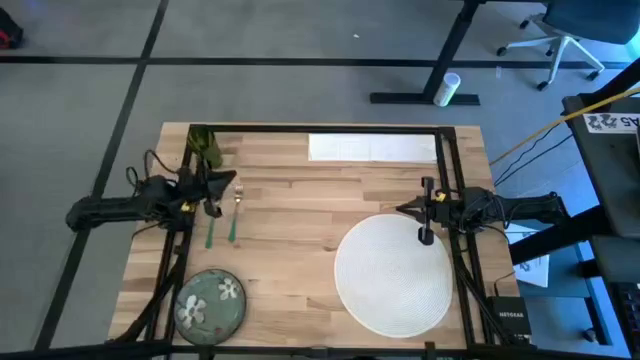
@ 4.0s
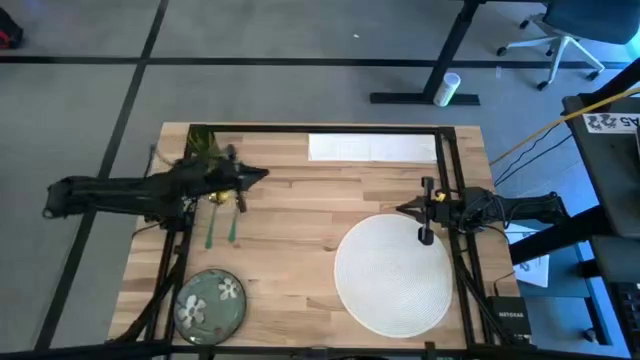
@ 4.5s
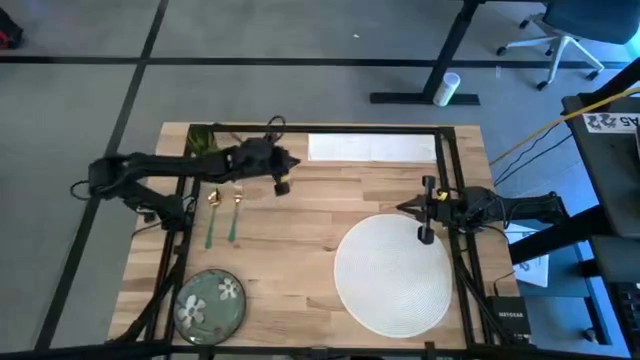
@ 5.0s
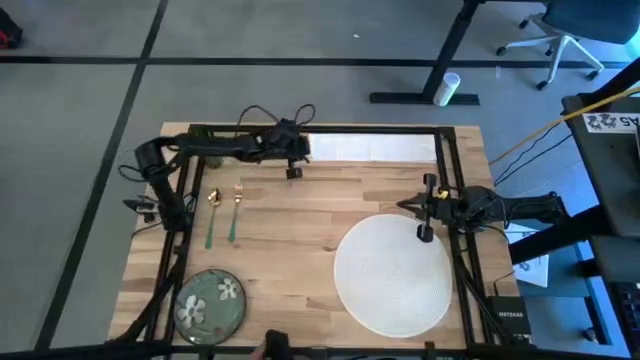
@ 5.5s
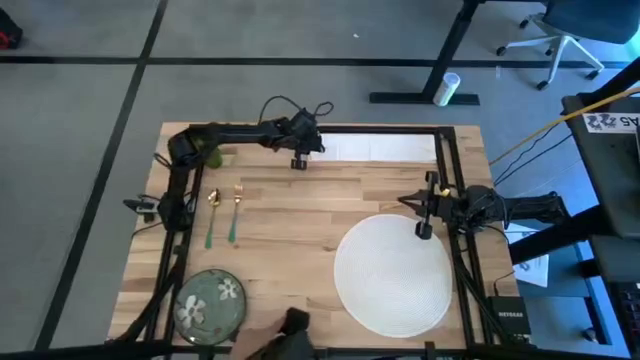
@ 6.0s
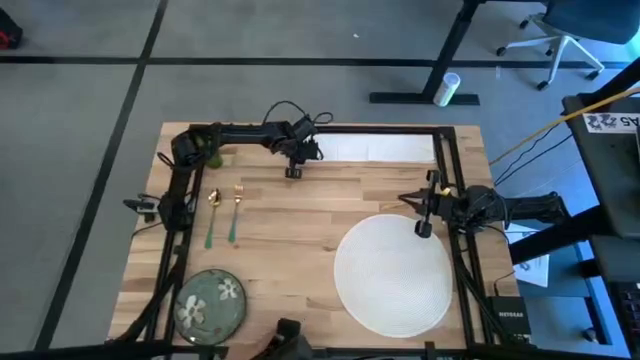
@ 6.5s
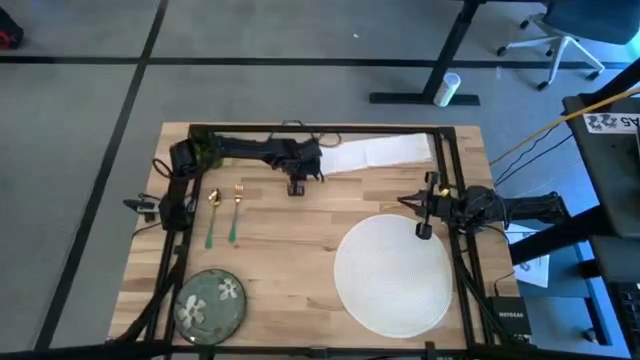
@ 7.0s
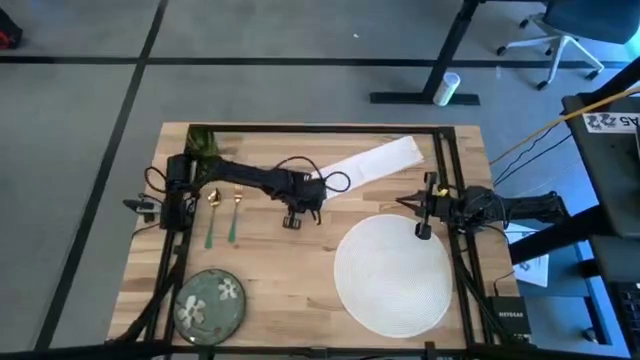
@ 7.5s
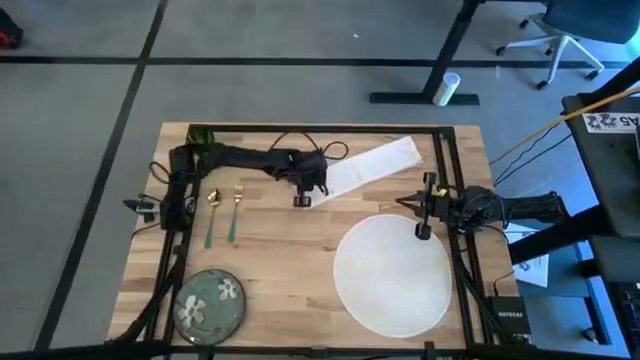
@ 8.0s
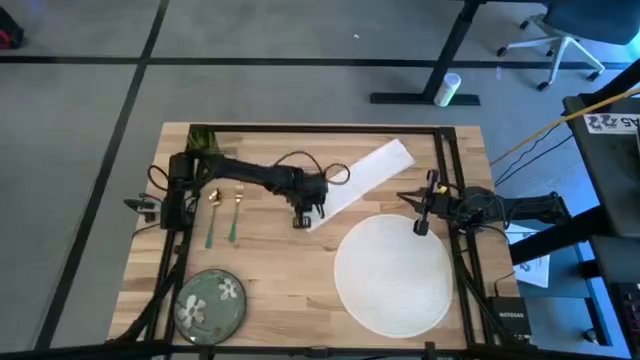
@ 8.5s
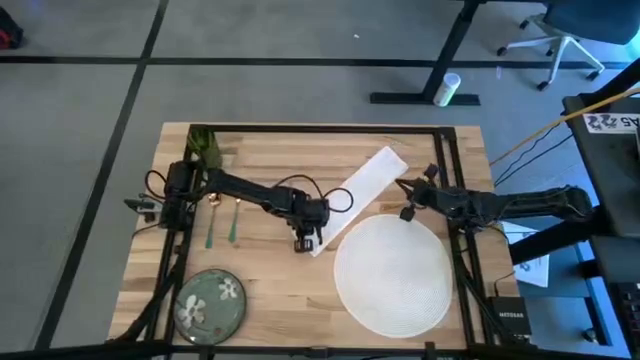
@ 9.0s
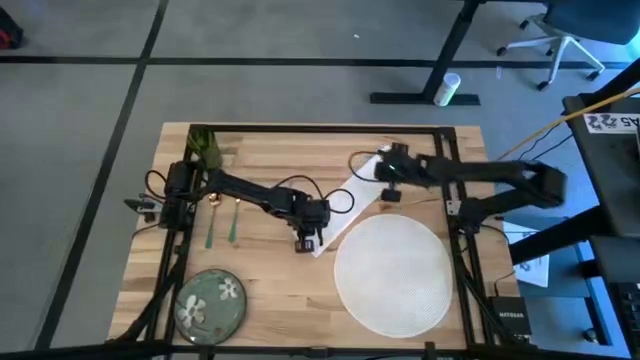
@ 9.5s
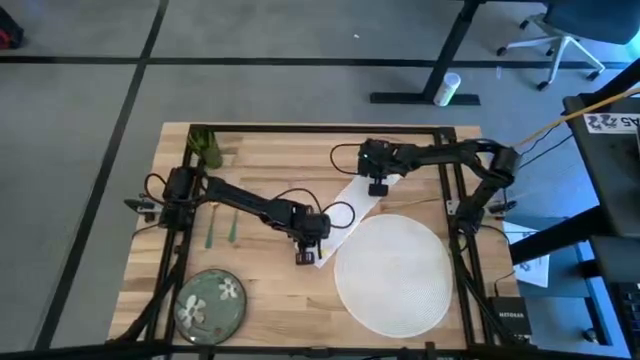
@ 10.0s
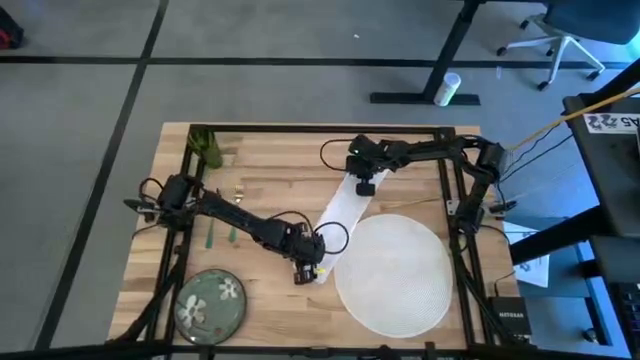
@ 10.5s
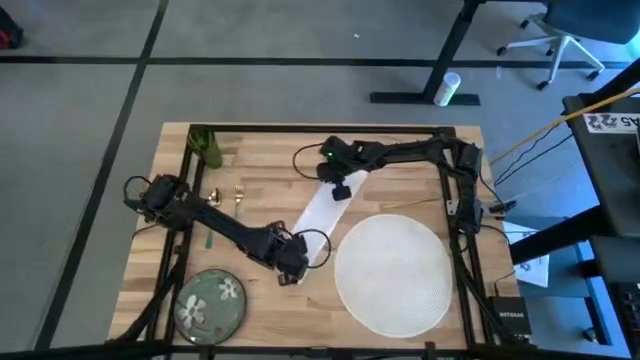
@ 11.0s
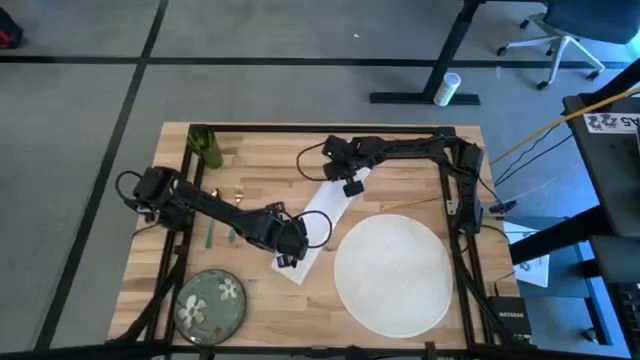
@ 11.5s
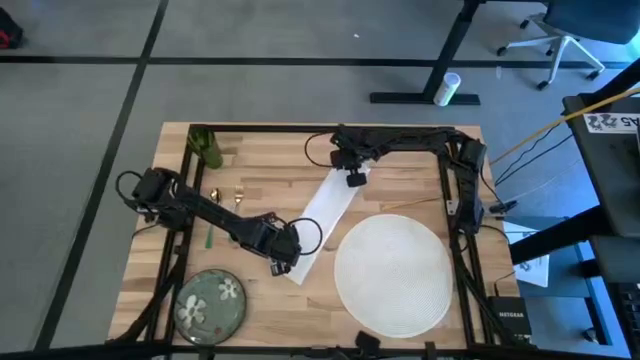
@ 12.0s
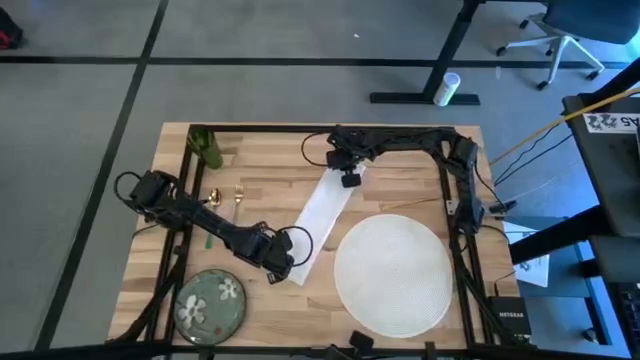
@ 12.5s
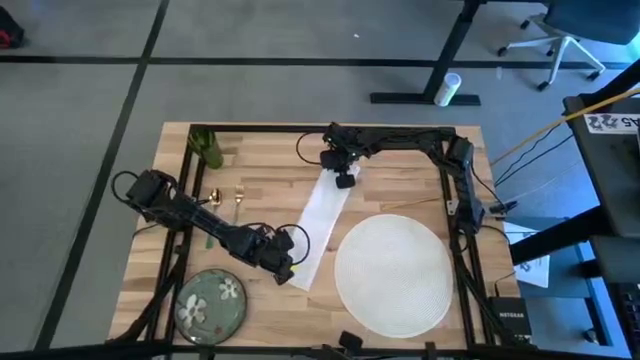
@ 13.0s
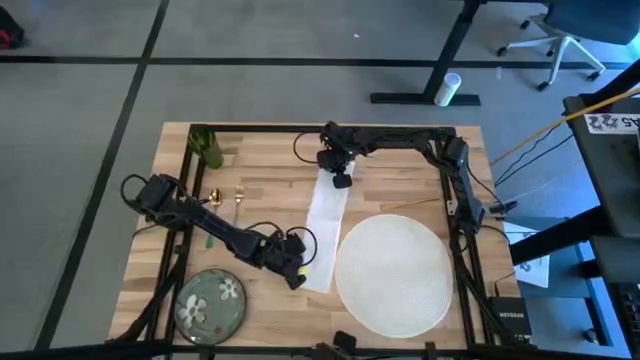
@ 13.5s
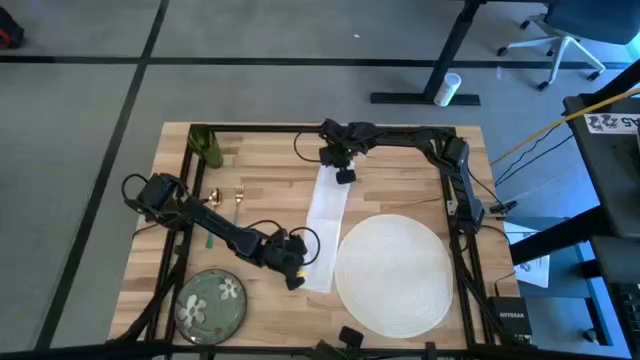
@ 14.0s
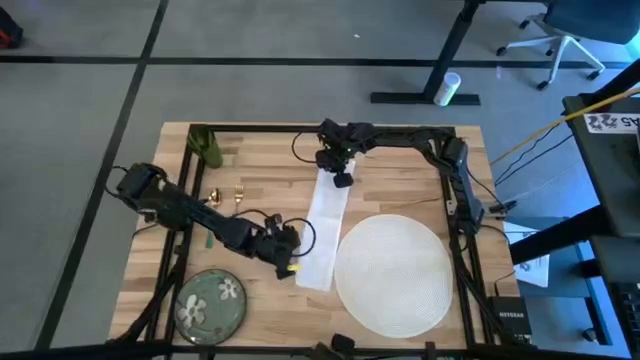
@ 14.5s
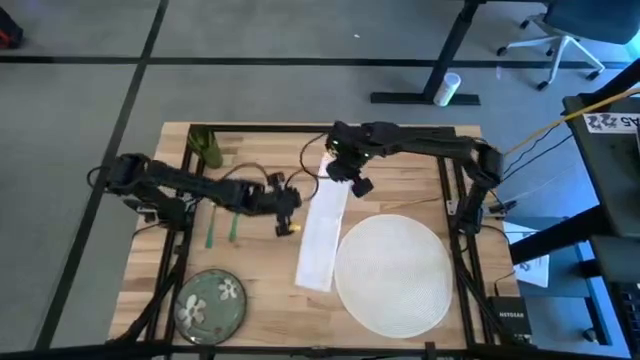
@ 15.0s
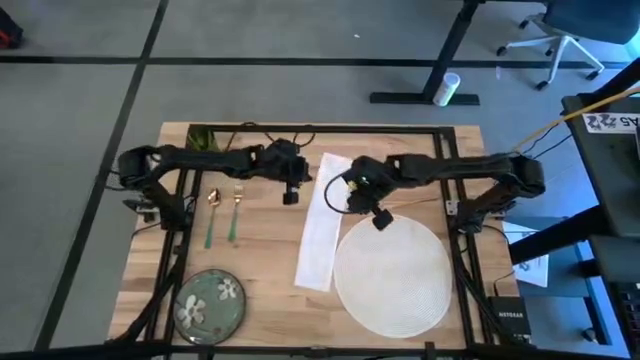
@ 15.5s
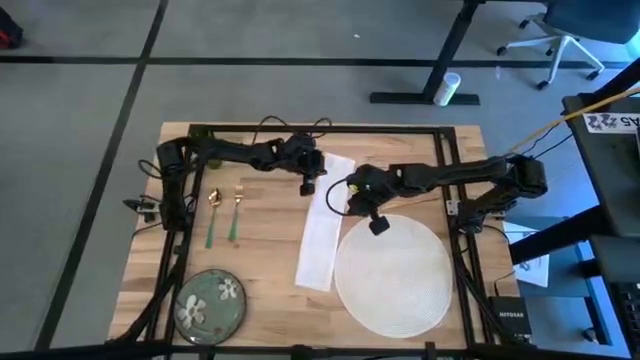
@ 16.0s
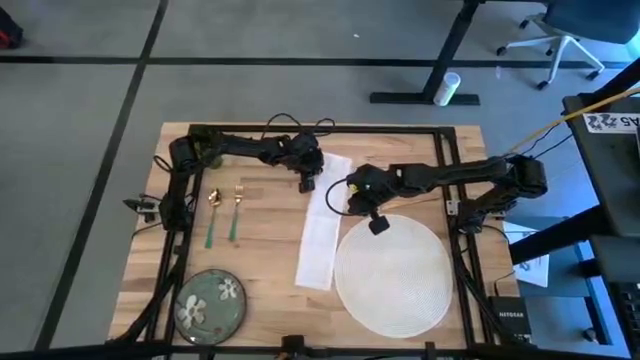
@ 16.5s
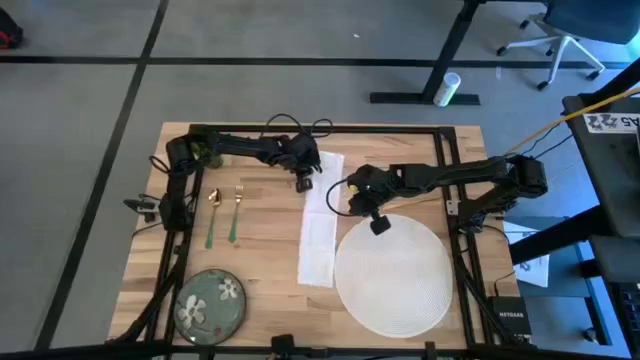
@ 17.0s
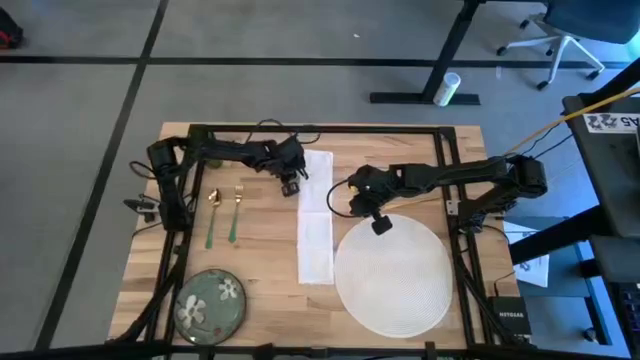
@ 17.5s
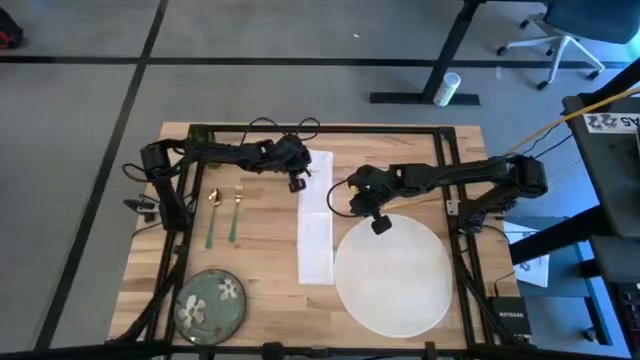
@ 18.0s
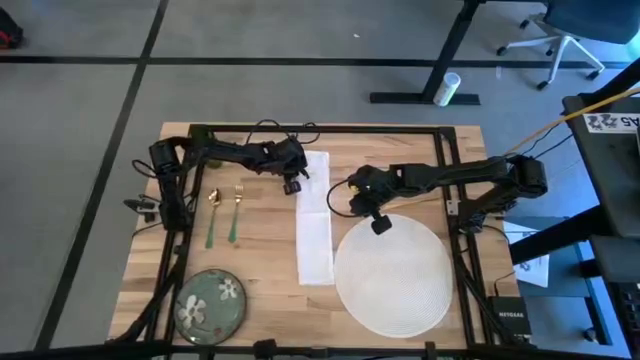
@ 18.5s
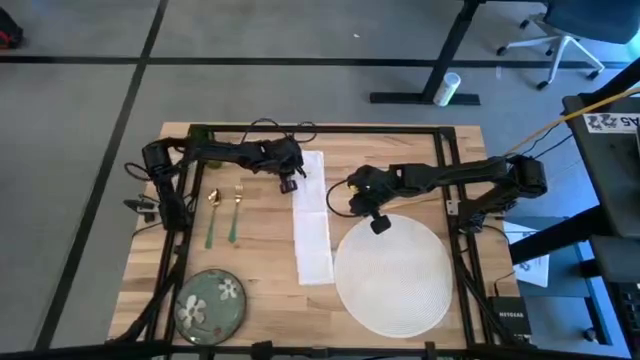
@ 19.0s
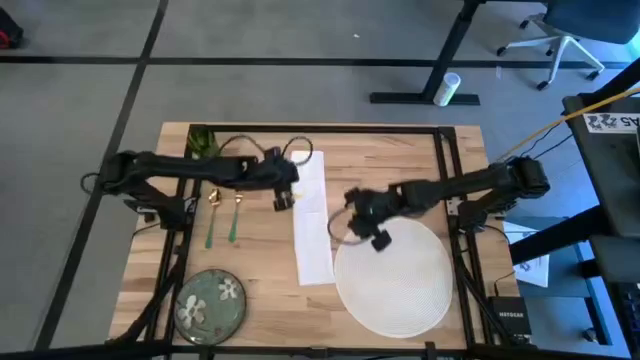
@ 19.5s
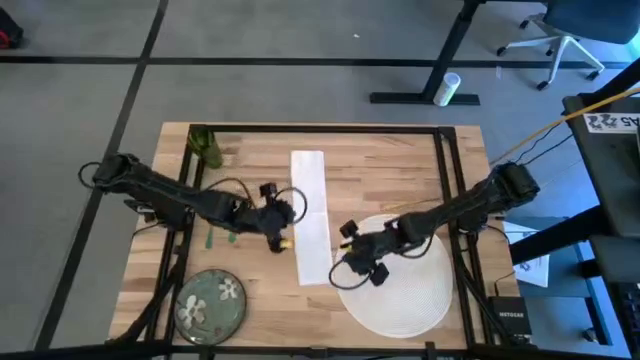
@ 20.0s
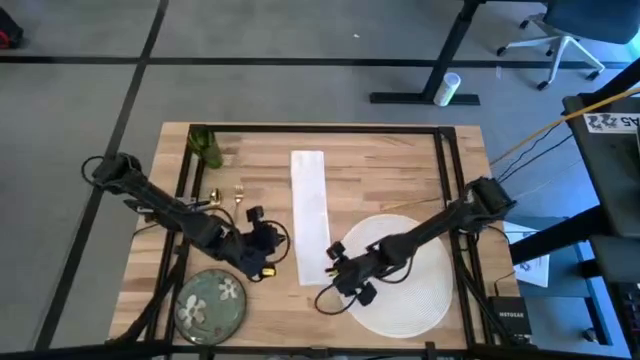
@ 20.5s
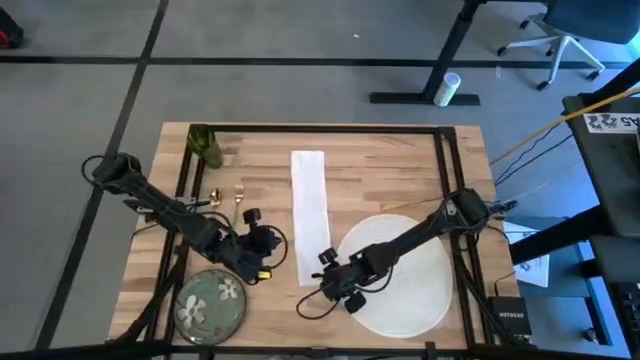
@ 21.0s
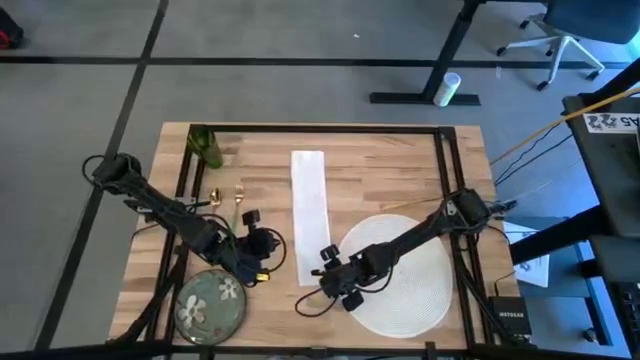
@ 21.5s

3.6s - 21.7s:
Task: Set table place
Fold the white table napkin
